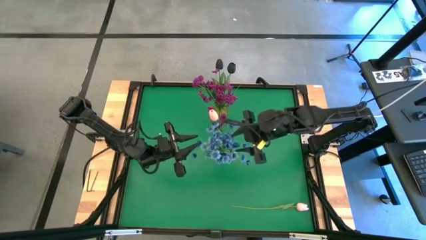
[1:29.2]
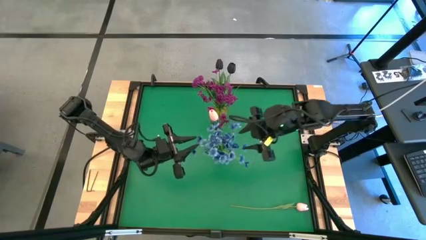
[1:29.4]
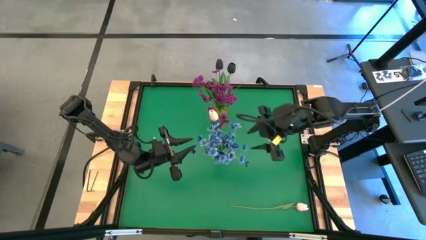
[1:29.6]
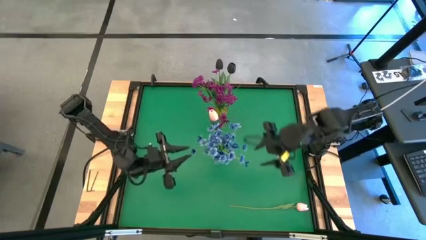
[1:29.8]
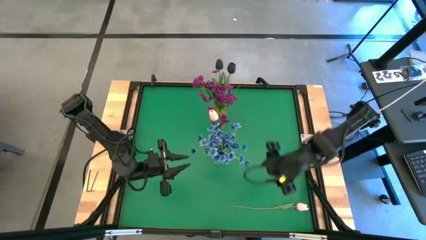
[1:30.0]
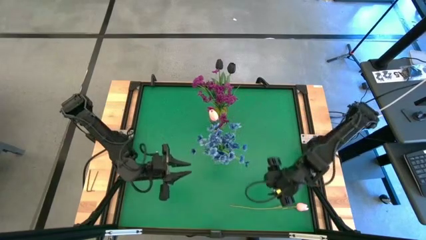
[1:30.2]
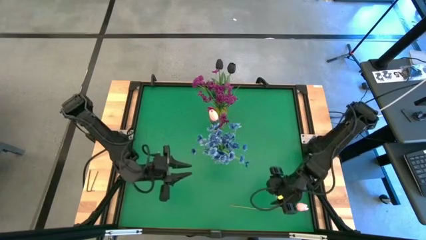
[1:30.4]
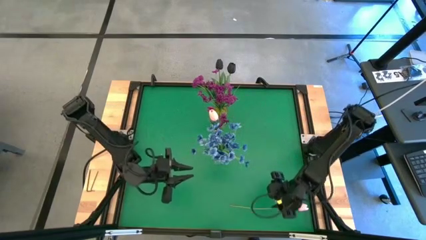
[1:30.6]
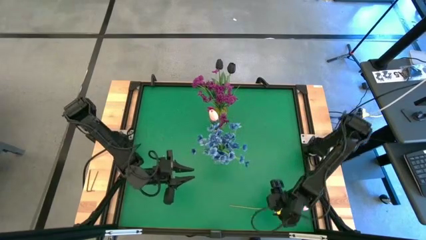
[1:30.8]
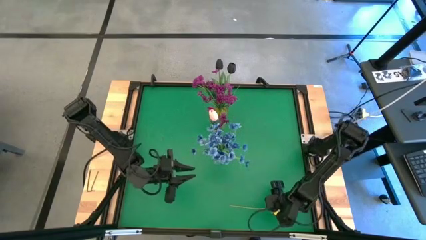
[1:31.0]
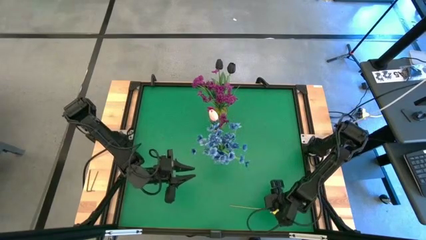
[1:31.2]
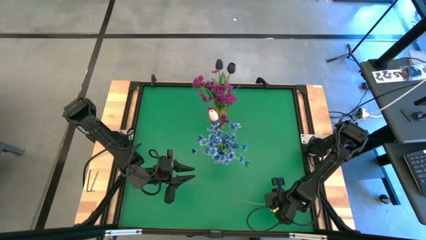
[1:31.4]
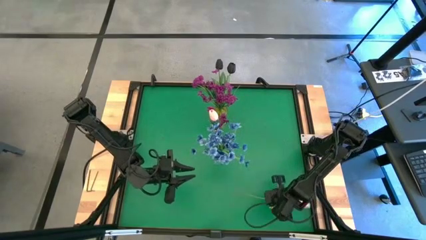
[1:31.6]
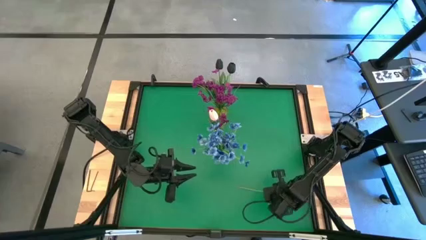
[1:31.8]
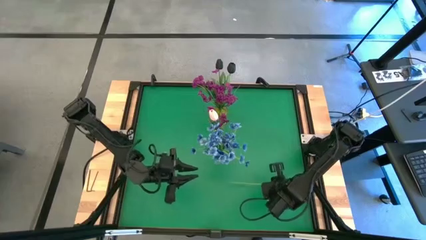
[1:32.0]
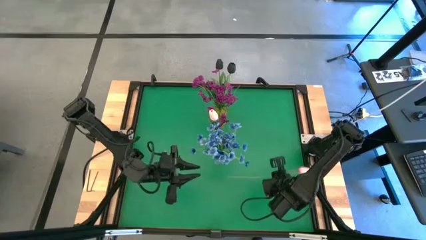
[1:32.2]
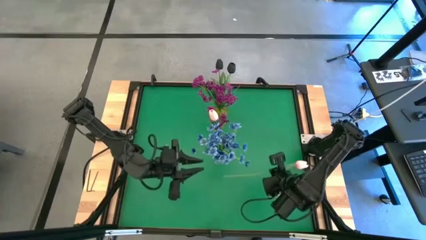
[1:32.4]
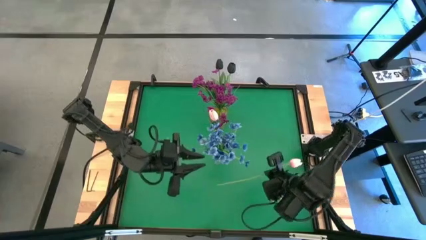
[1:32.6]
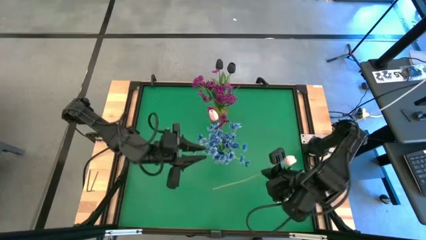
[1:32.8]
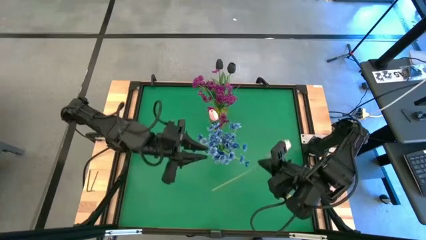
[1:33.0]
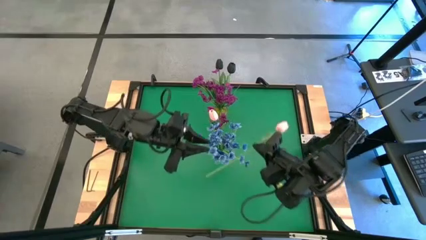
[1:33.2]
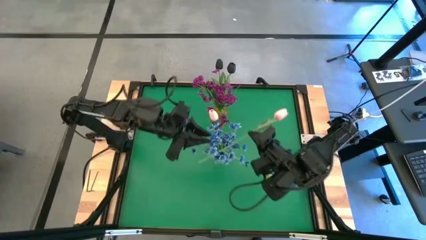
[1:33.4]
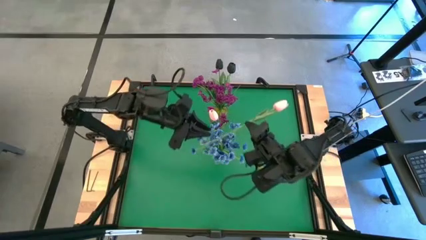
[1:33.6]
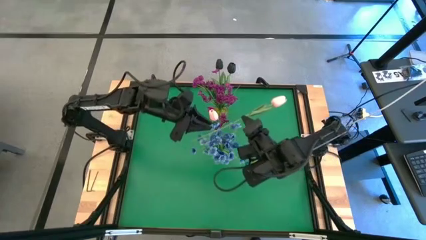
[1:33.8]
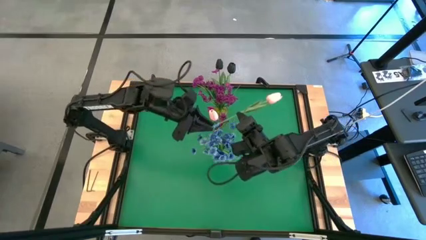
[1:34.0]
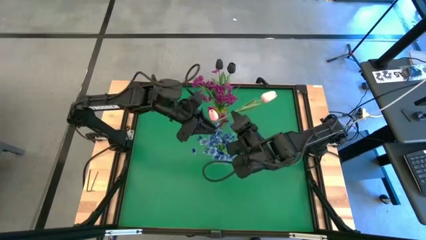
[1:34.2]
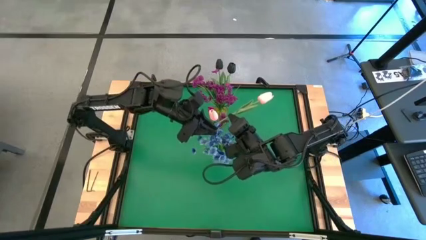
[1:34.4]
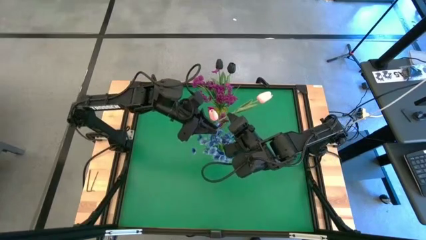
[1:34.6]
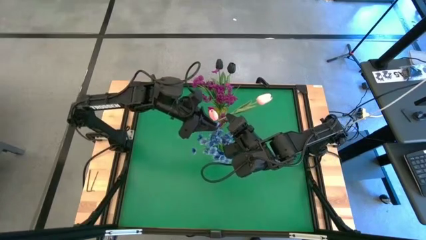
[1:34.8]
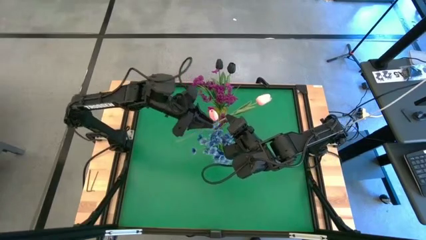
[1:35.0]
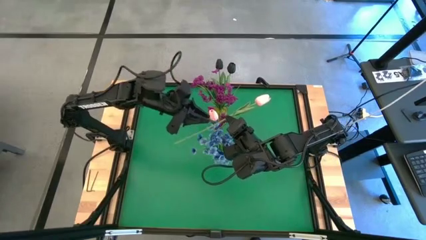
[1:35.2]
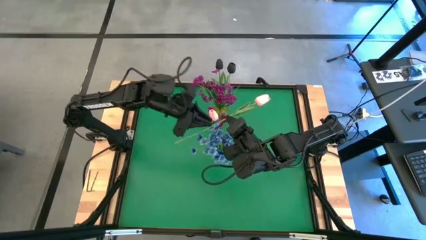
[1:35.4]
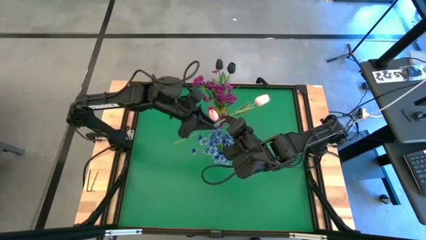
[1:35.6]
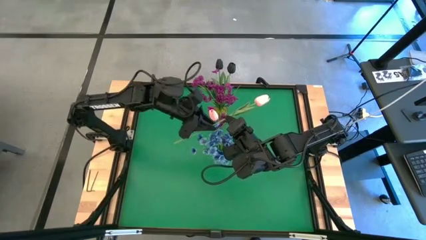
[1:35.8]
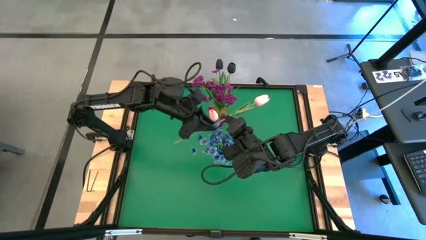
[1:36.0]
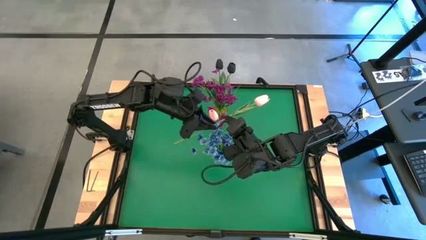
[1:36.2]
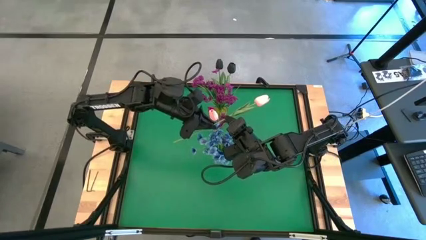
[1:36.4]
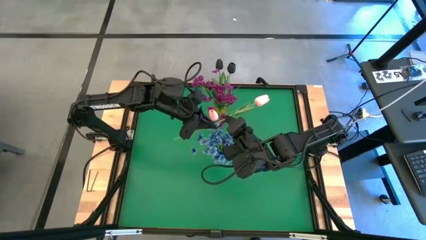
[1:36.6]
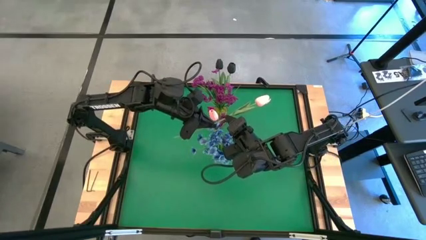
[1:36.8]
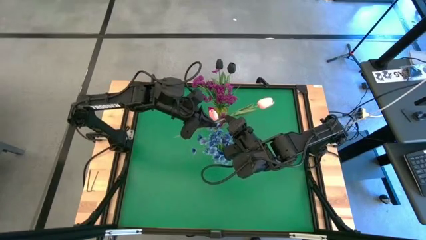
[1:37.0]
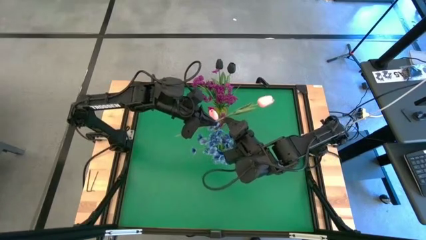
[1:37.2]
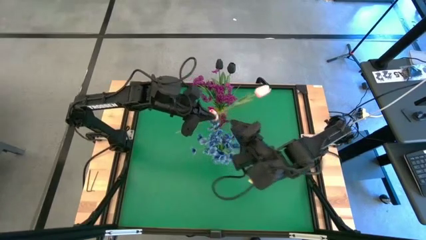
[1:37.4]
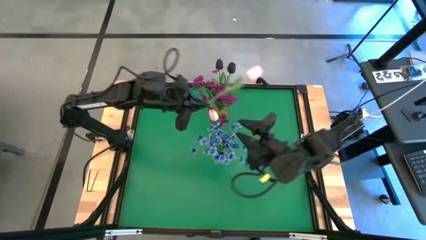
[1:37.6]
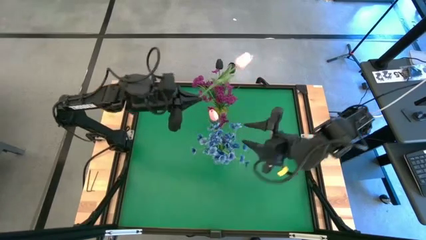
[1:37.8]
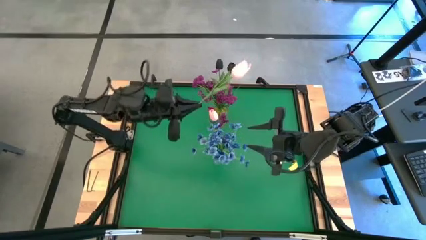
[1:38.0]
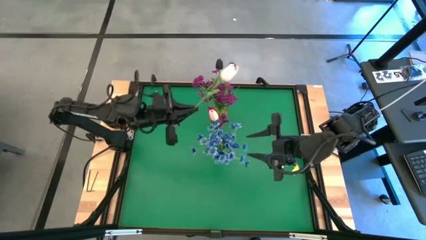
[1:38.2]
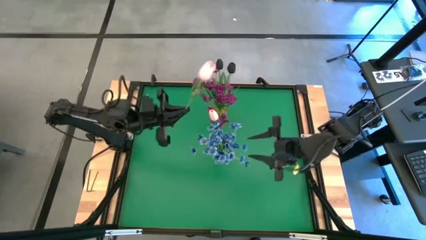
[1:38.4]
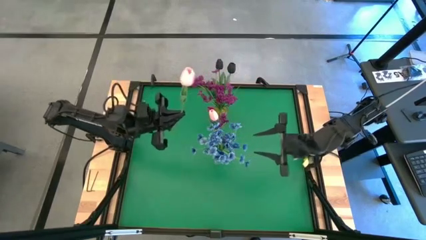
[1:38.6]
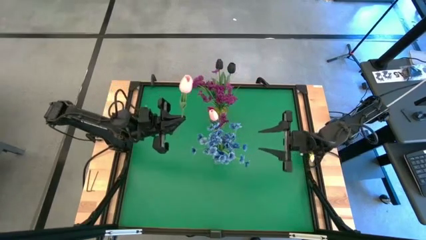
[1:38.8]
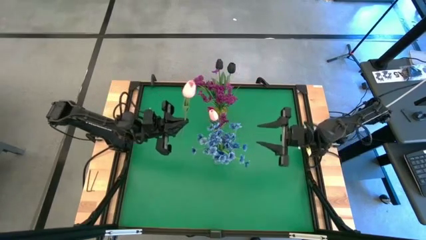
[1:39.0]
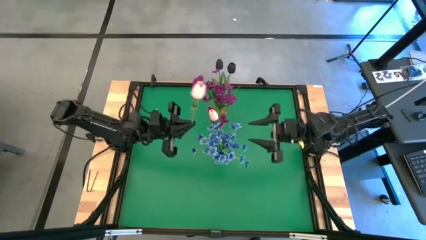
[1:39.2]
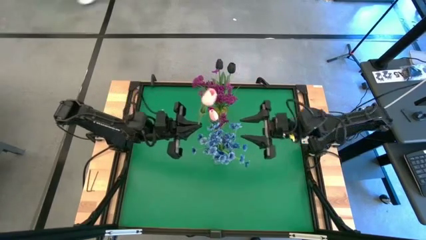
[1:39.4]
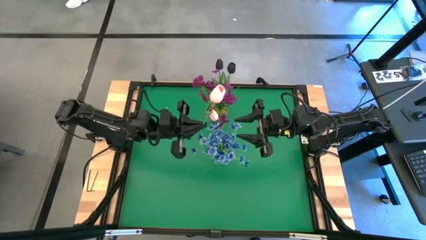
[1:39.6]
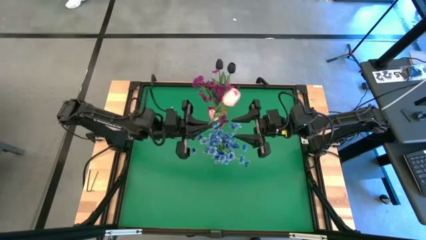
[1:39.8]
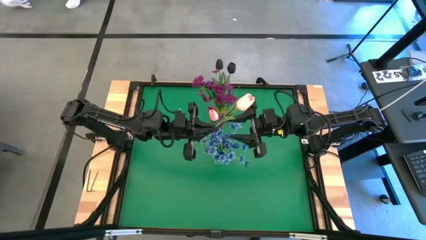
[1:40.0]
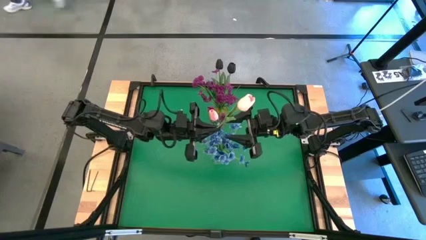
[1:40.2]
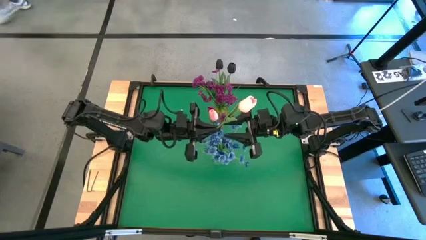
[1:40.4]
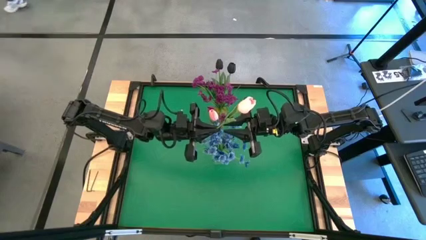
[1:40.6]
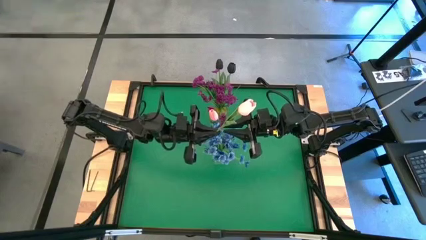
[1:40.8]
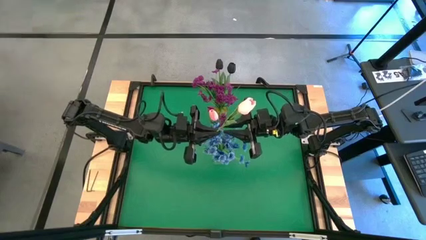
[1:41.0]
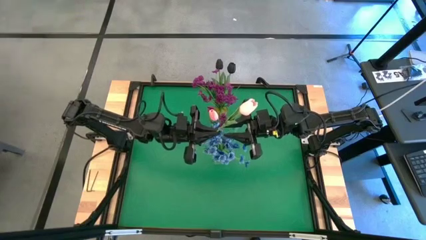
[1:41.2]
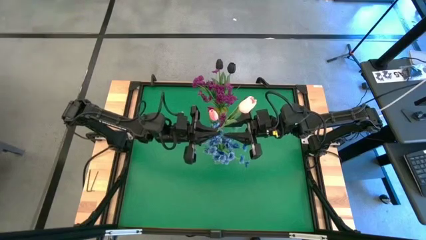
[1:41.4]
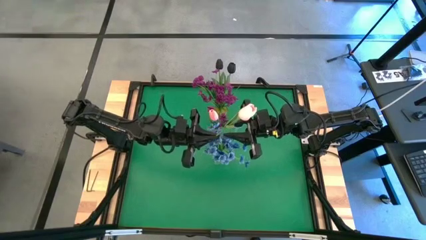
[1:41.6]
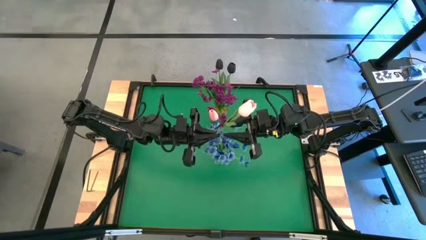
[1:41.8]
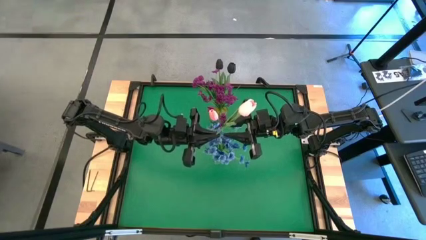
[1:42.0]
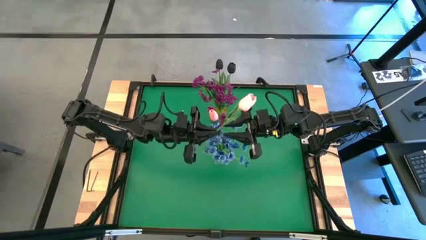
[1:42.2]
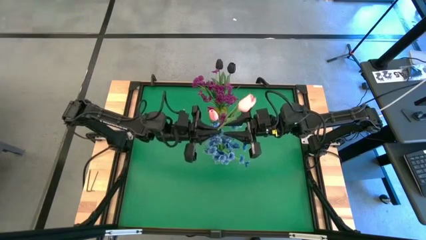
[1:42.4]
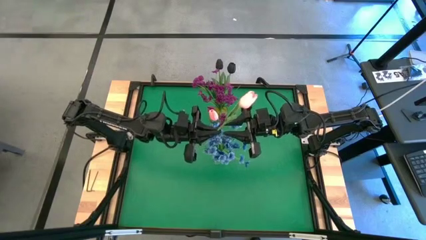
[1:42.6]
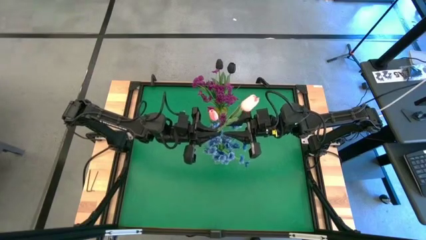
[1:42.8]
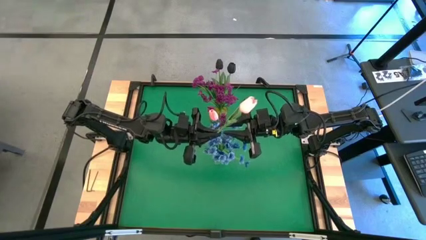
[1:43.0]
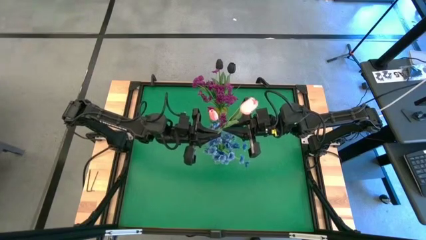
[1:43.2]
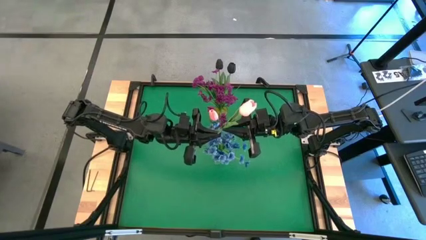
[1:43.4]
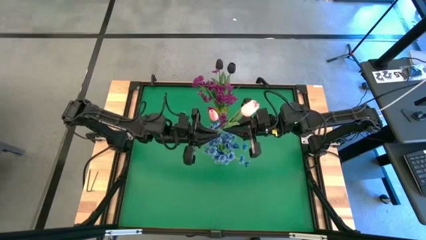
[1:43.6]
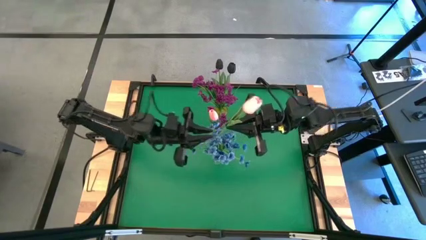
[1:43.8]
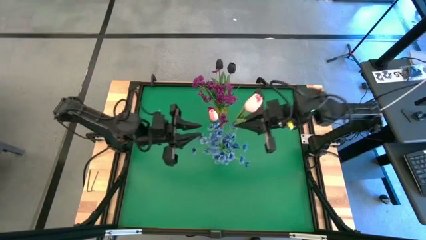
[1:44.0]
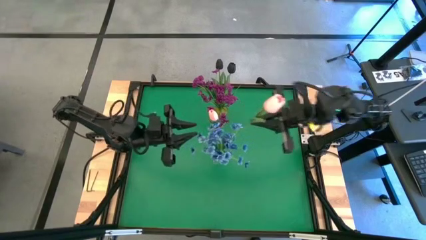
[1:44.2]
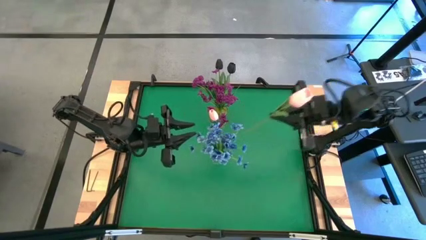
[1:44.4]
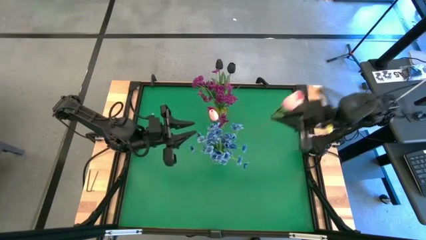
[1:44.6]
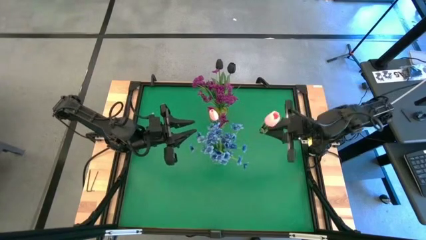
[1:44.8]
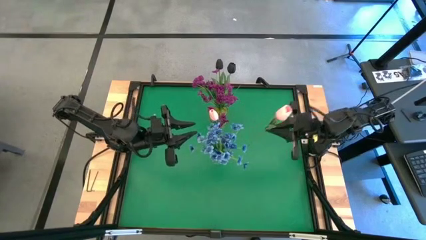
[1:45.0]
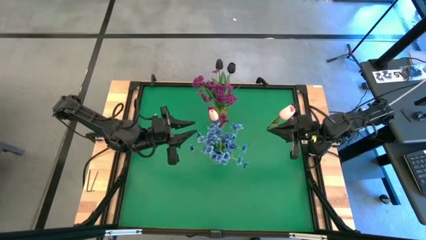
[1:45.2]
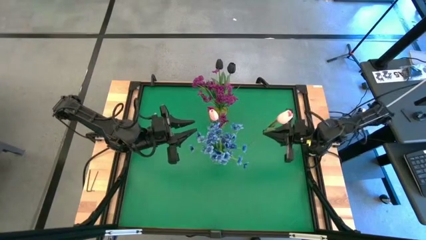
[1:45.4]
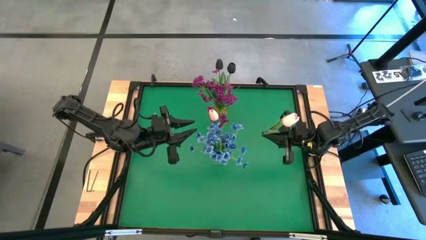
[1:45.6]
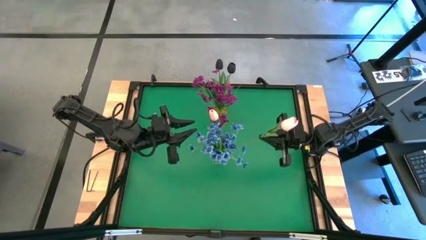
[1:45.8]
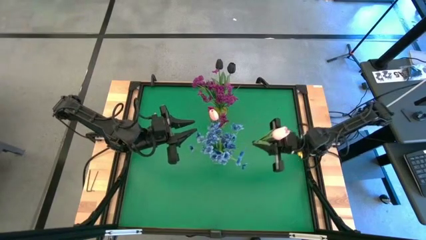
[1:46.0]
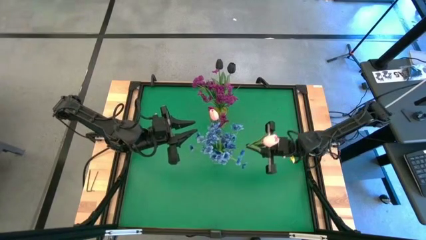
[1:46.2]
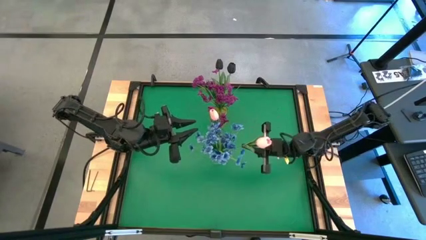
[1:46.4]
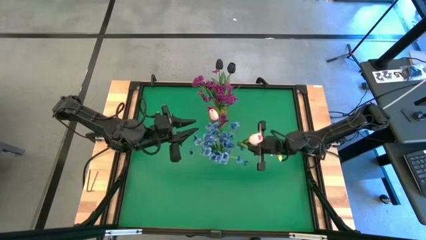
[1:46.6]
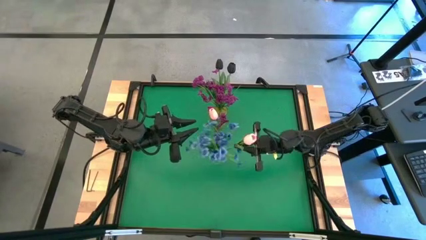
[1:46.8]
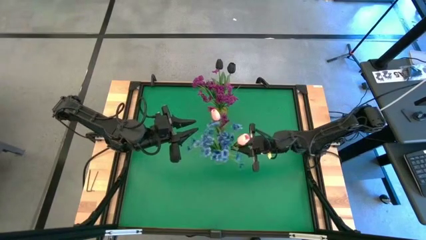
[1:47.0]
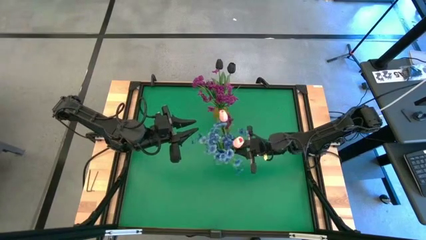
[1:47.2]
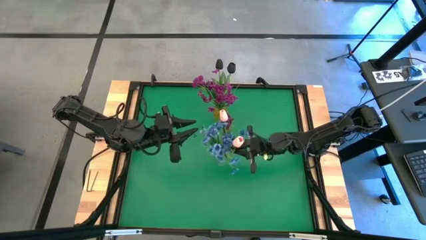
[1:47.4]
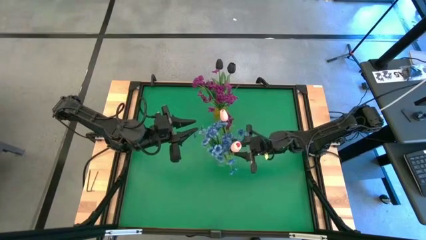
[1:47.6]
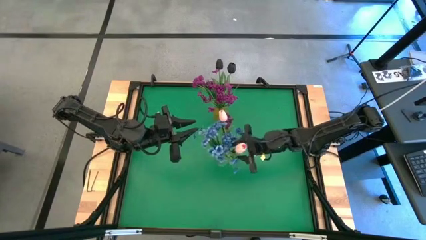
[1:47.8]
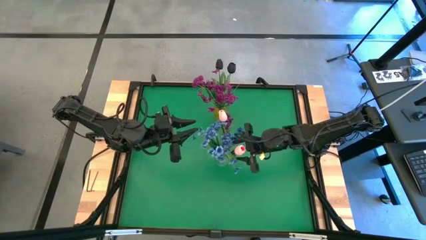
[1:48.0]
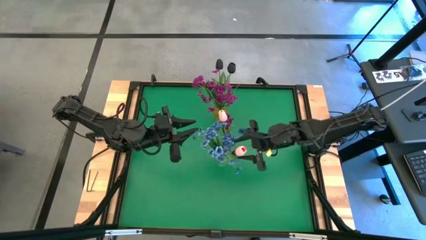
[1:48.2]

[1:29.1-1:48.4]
Task: Sort flowers into vase by color
Put the pink flower into the transparent vase
